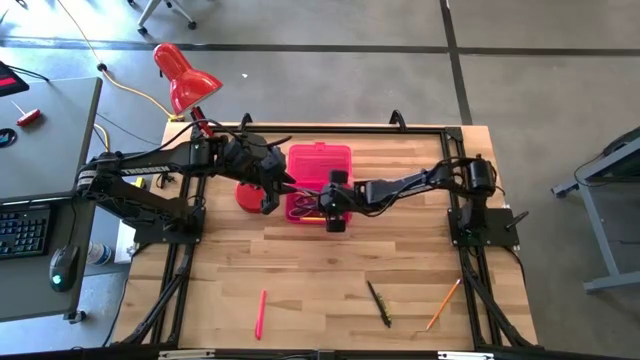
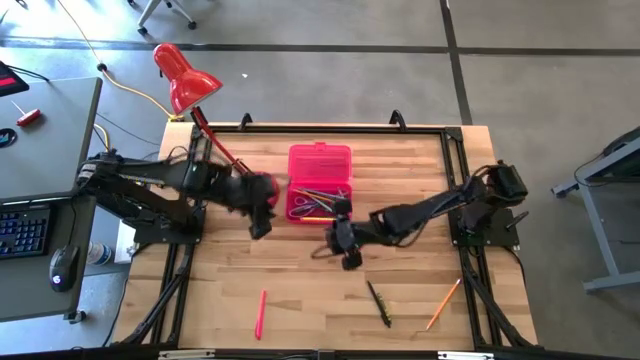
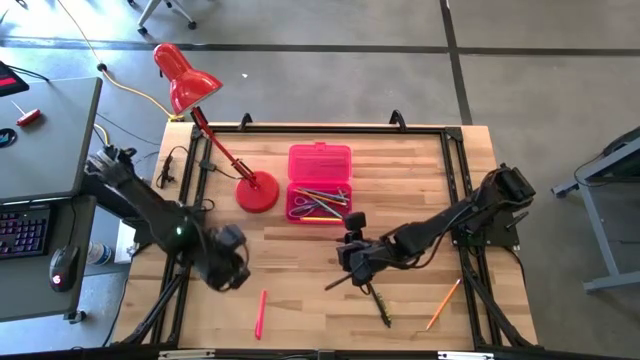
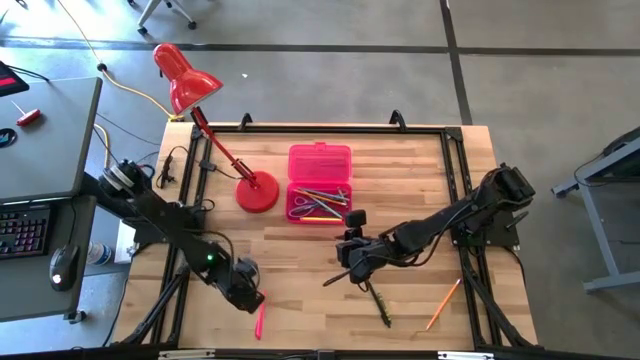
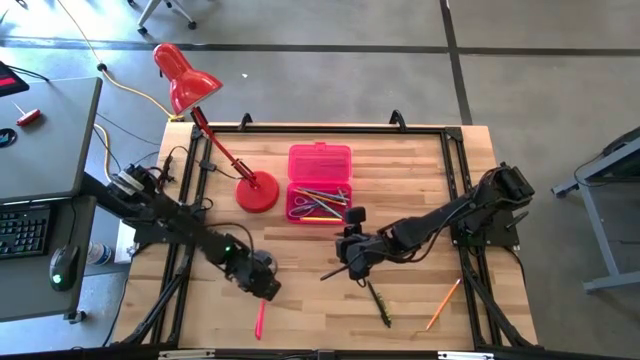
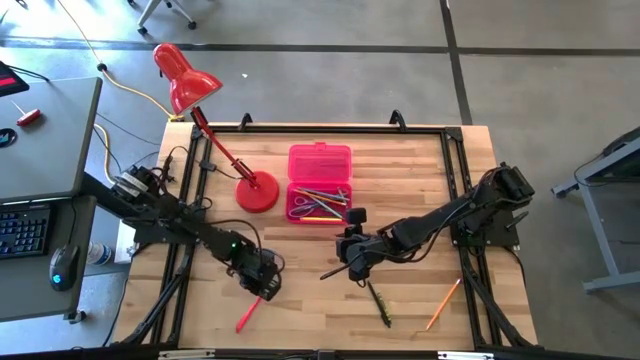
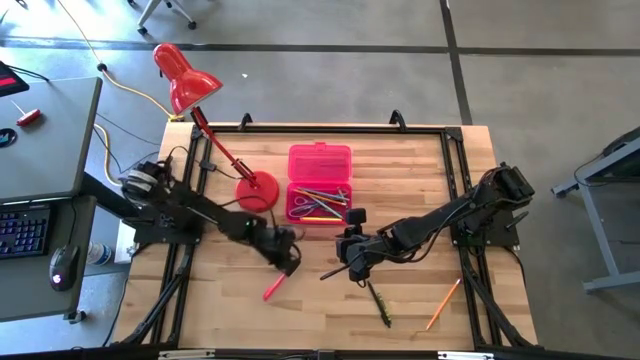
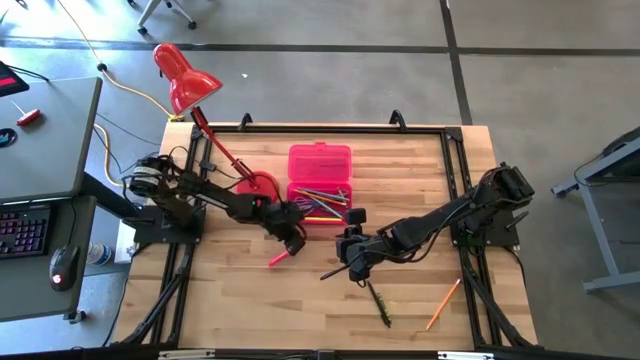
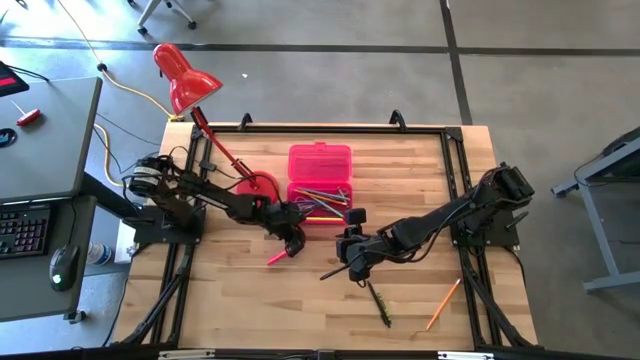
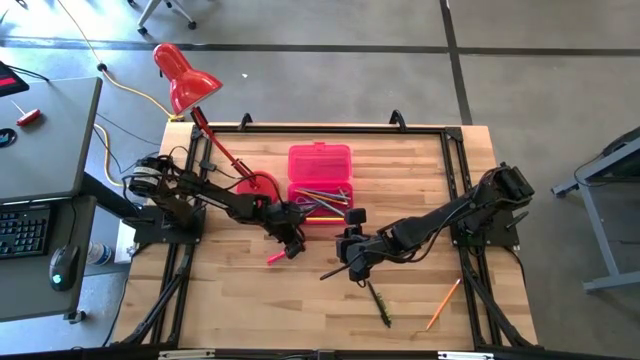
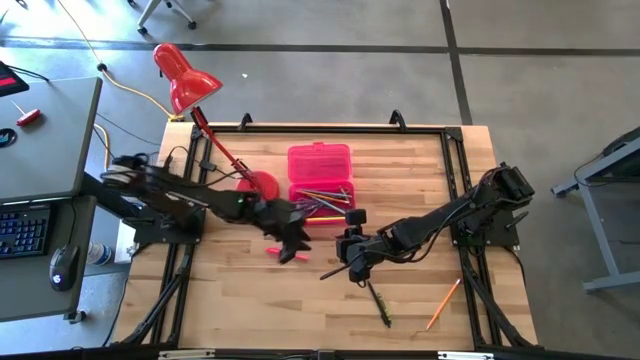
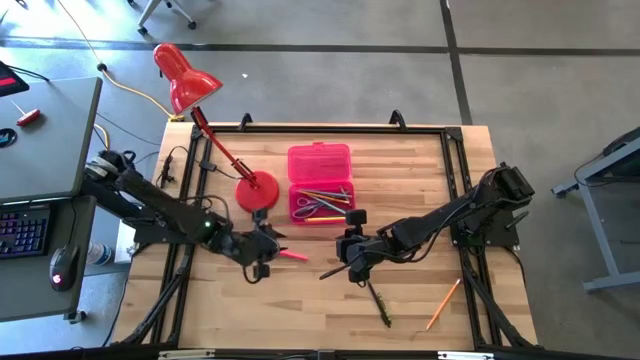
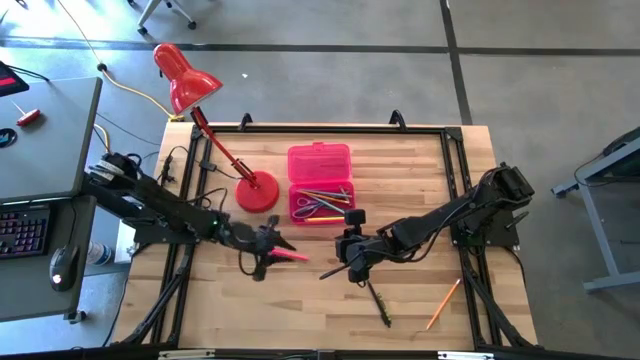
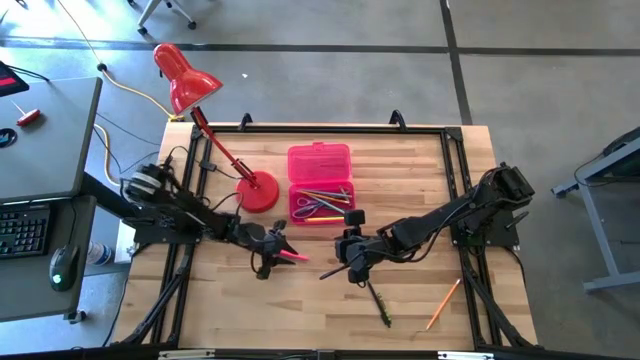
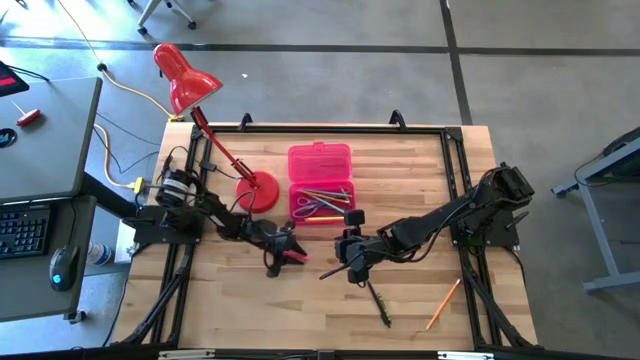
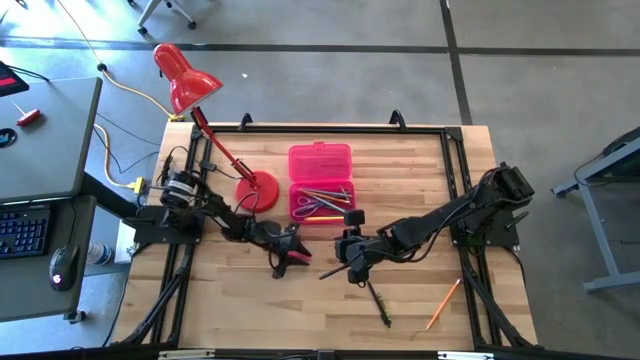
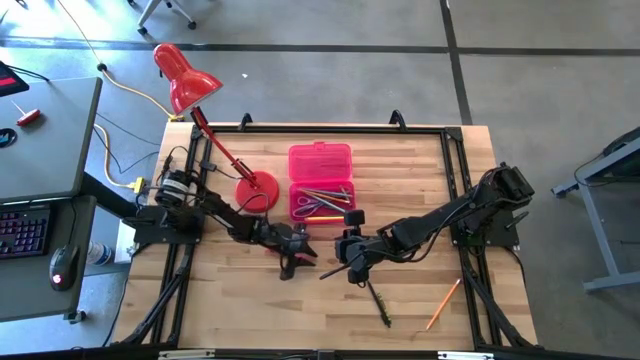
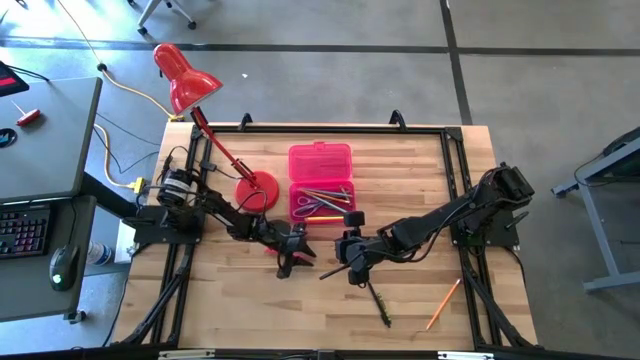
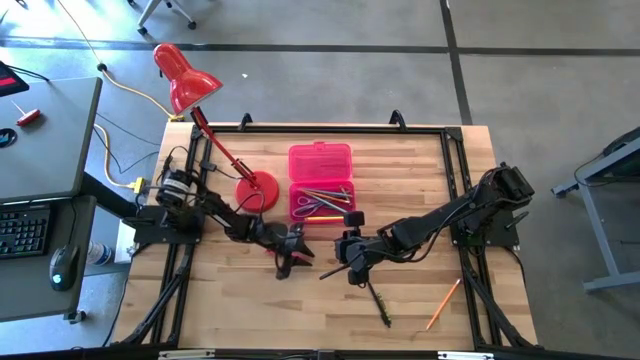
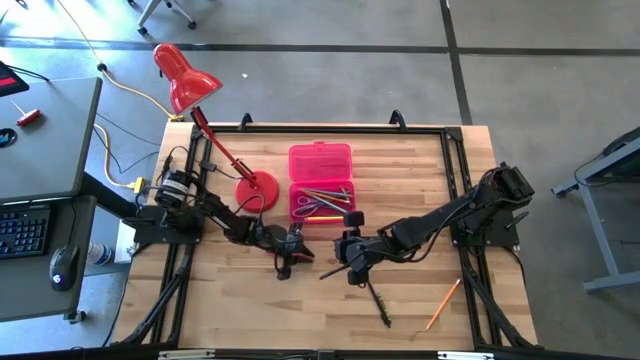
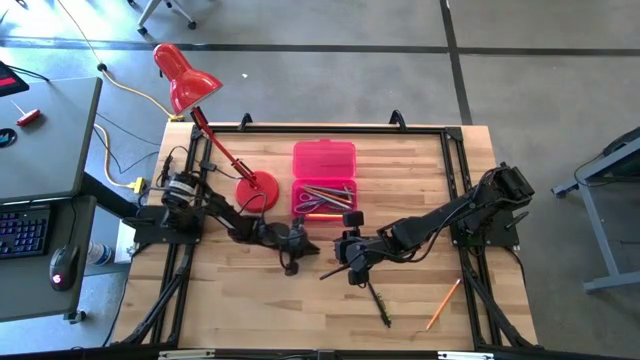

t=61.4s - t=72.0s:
Task: Pick & place school supplies into a supply box
Put the pink pen into the pink supply box

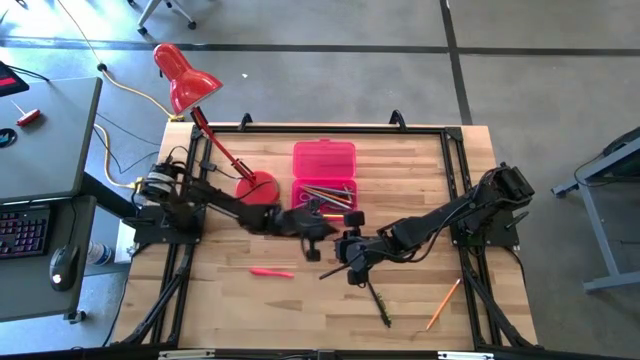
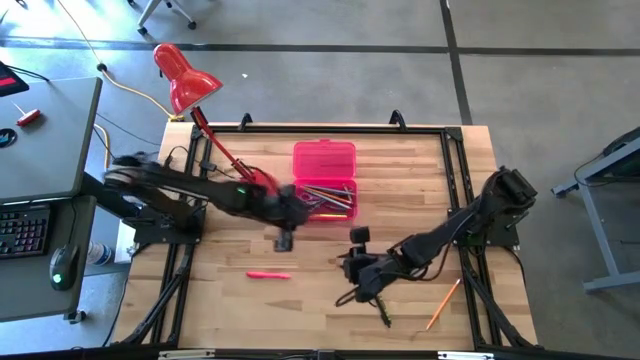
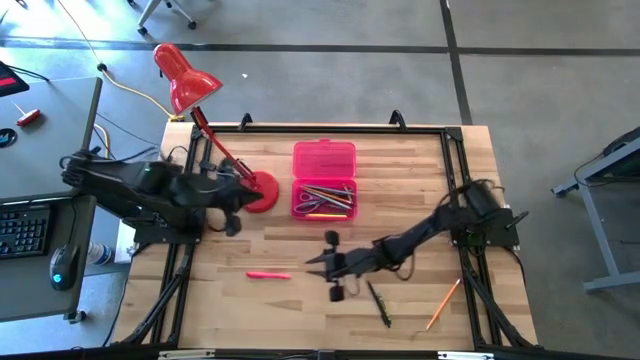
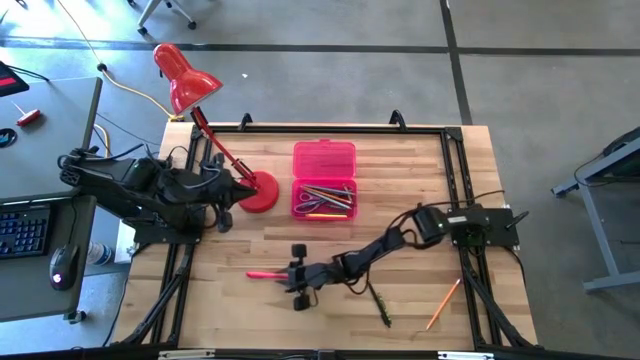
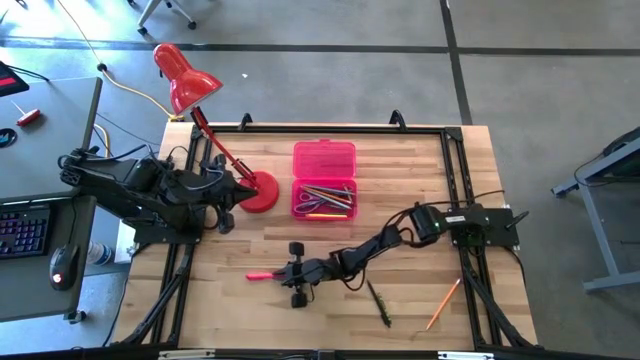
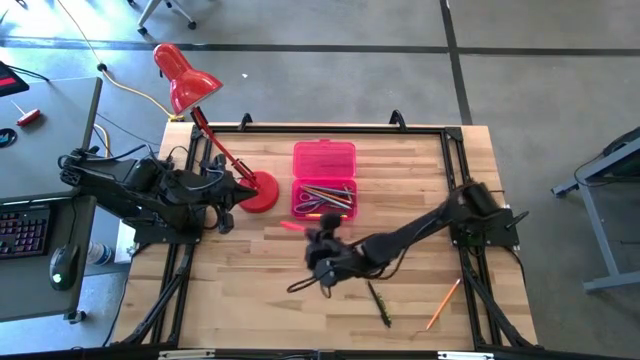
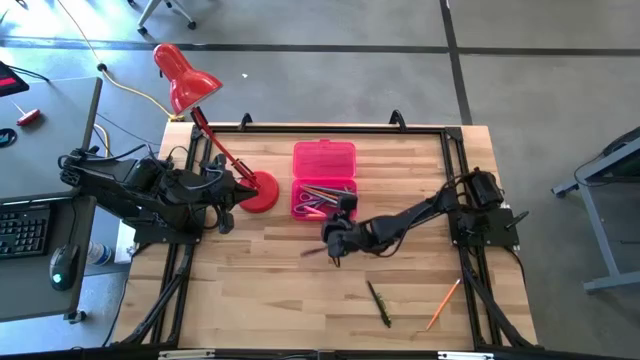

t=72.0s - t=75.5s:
Put the pink pen into the pink supply box

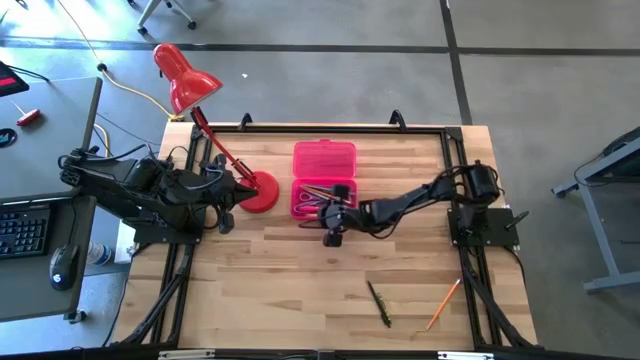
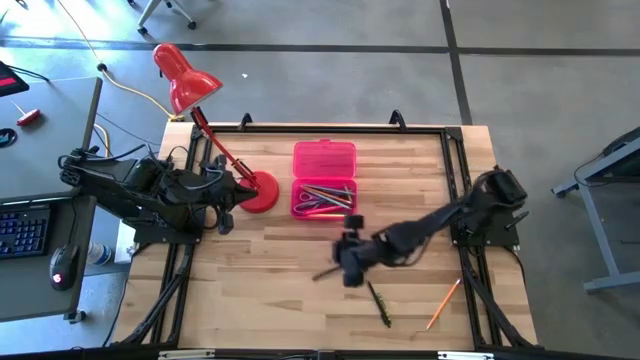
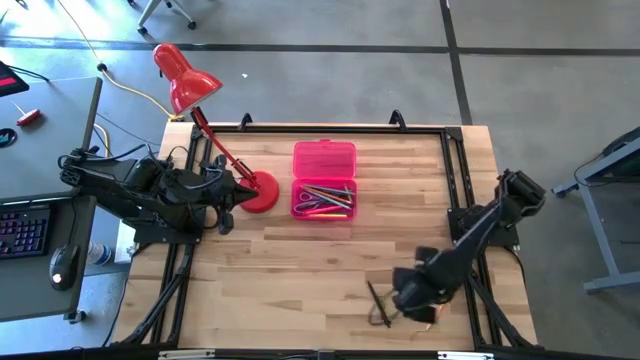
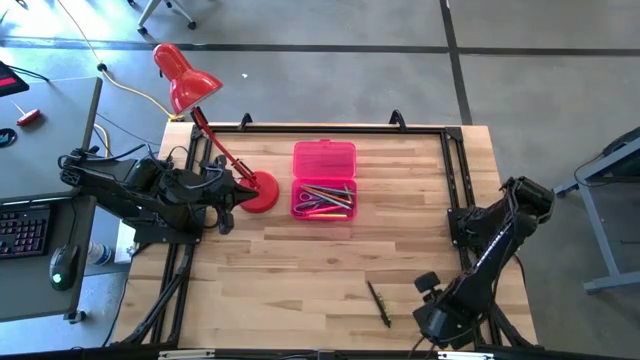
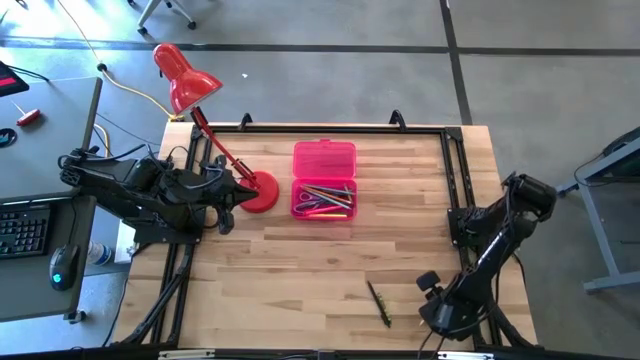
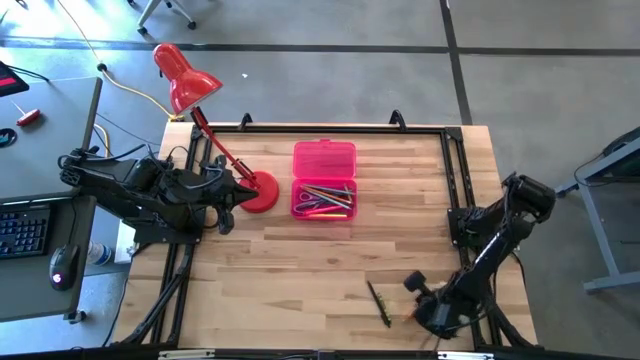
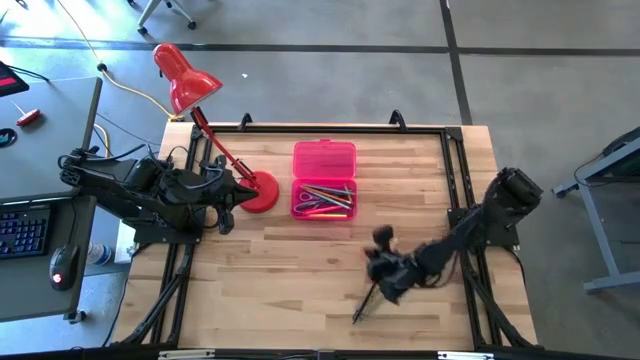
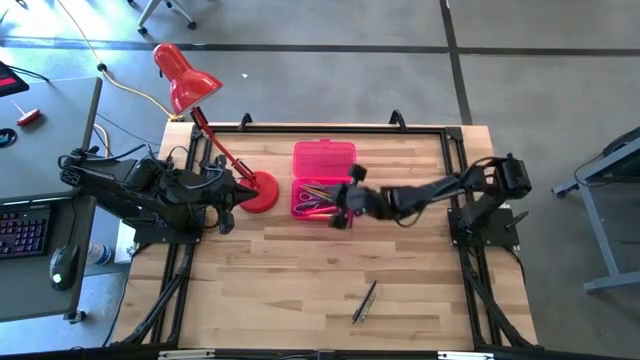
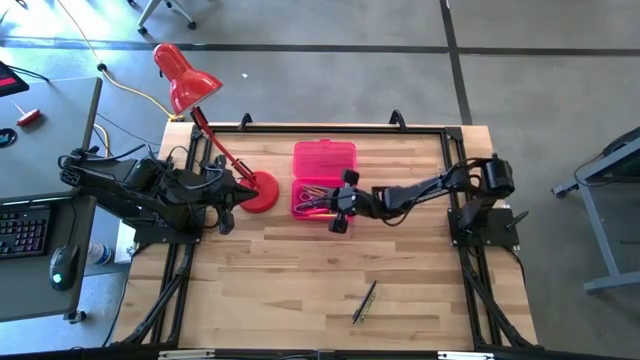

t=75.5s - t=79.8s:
Put the orange pencil into the pink supply box

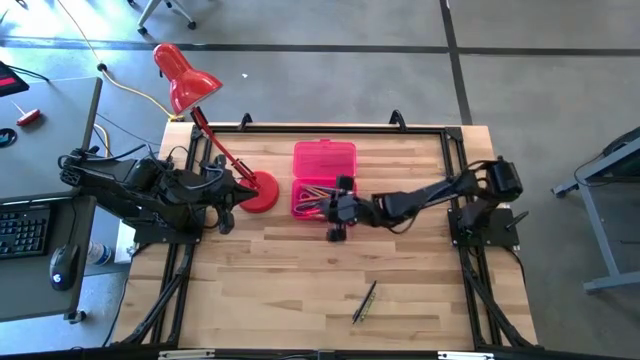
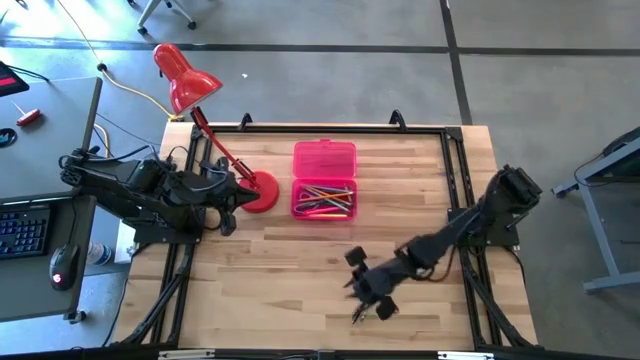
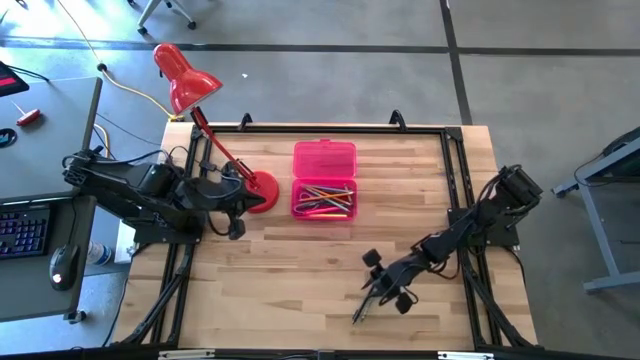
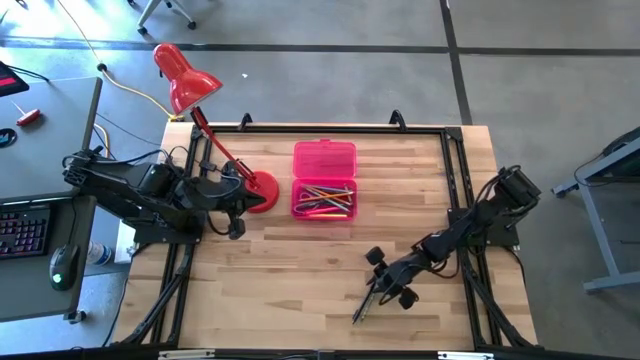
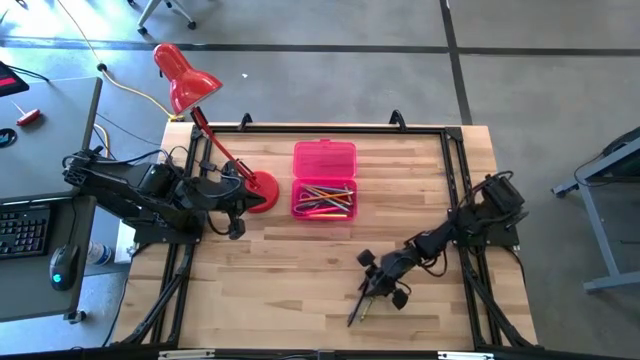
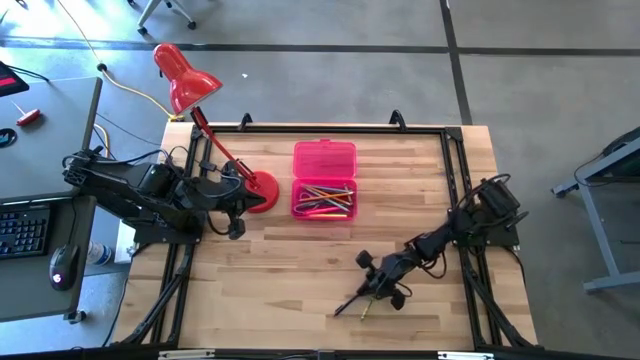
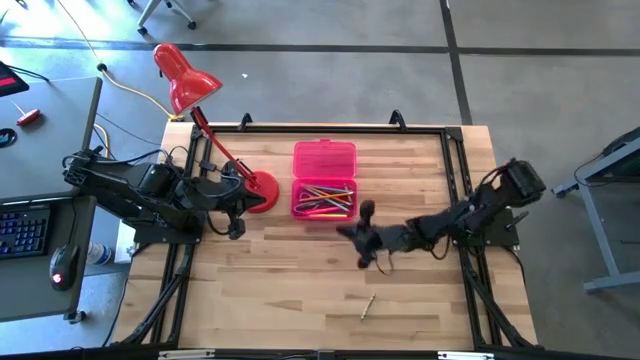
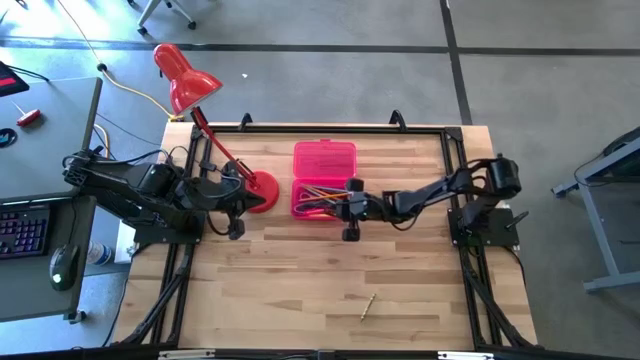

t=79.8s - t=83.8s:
Put the black pen into the pink supply box
